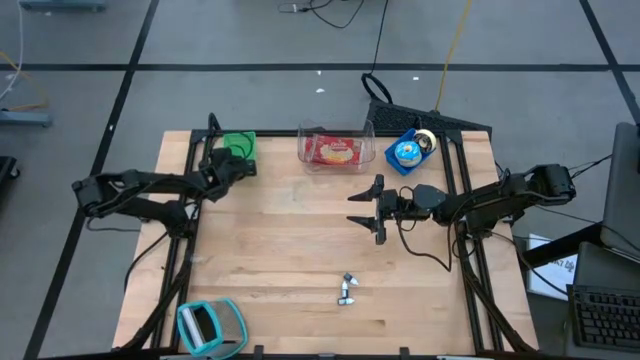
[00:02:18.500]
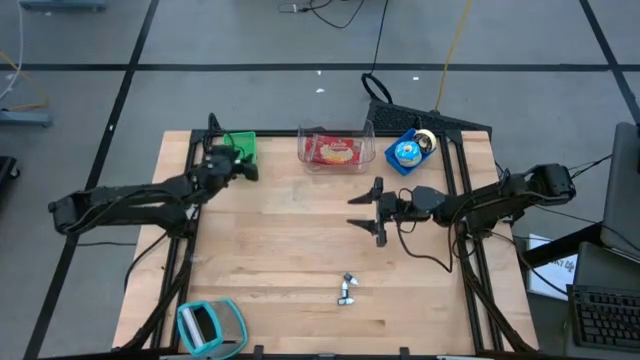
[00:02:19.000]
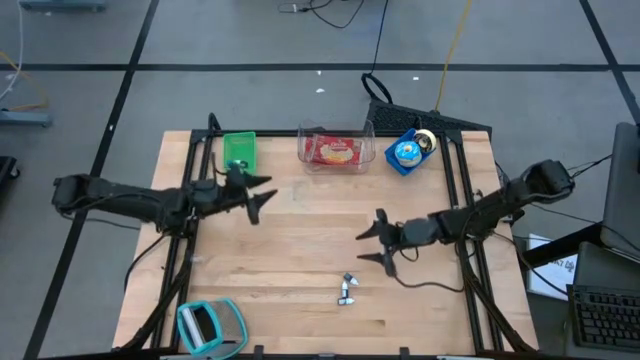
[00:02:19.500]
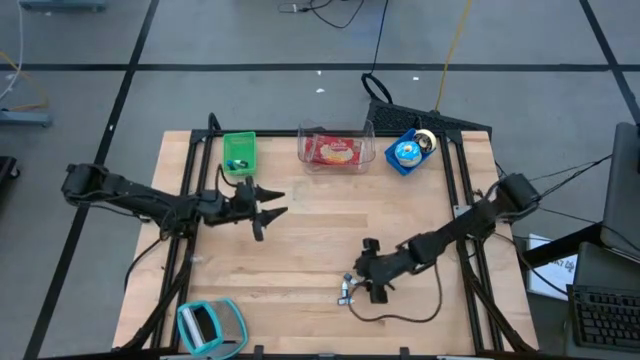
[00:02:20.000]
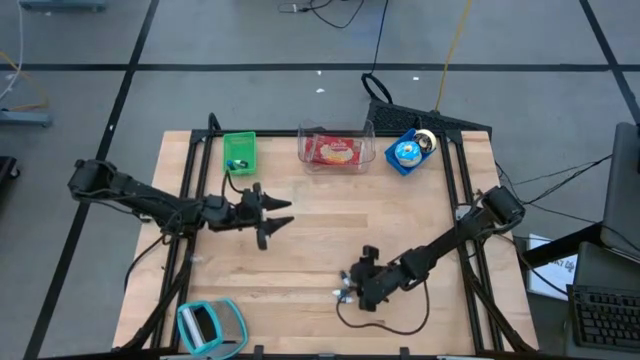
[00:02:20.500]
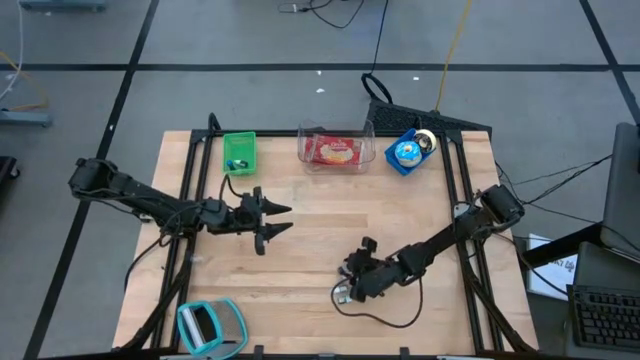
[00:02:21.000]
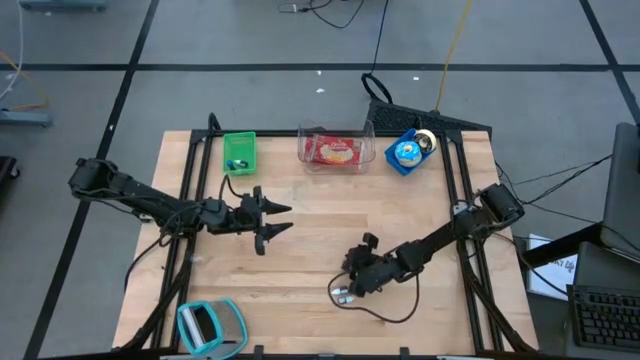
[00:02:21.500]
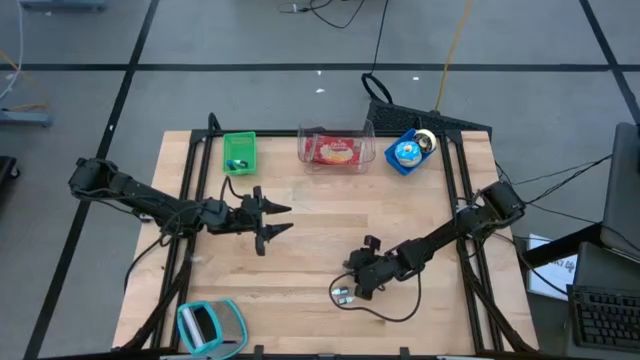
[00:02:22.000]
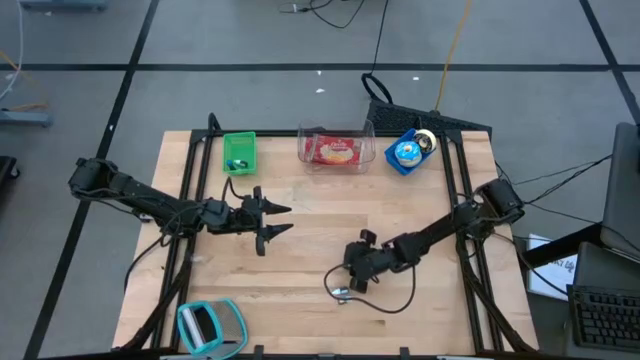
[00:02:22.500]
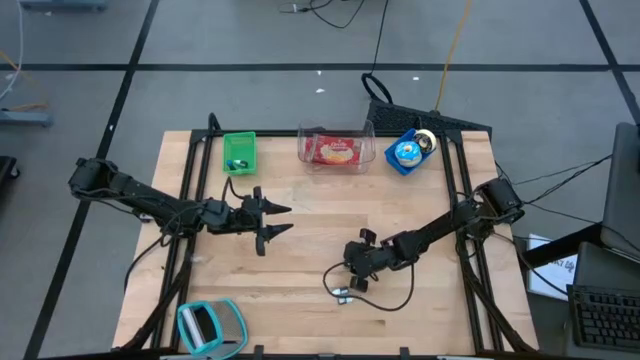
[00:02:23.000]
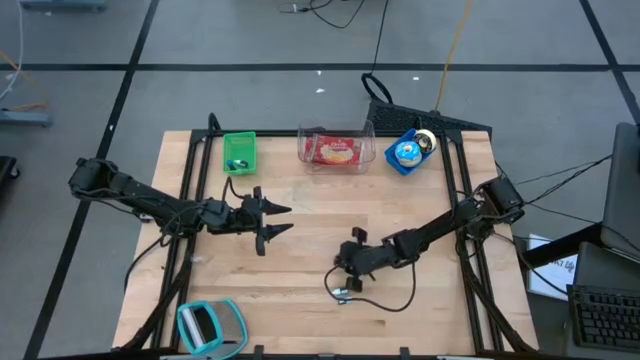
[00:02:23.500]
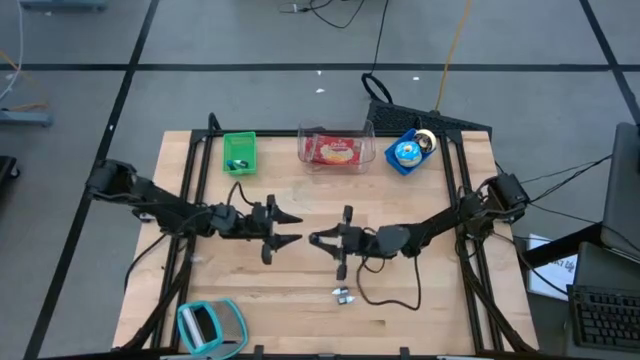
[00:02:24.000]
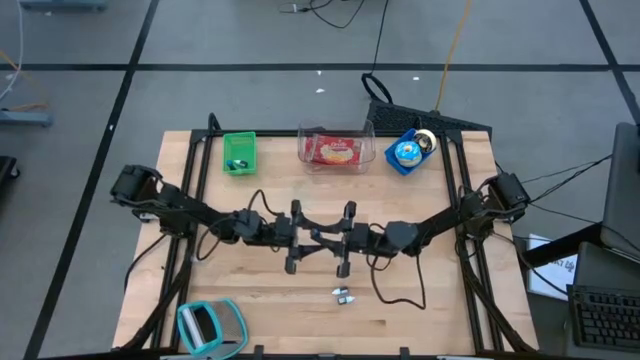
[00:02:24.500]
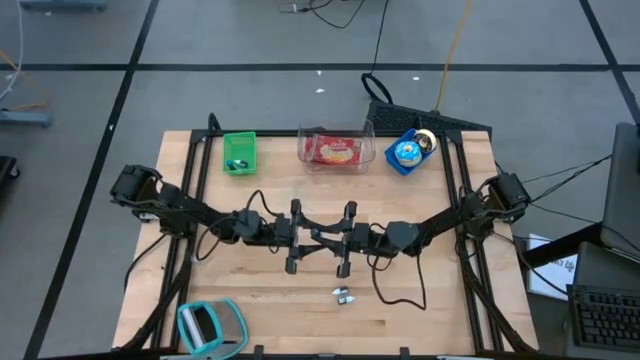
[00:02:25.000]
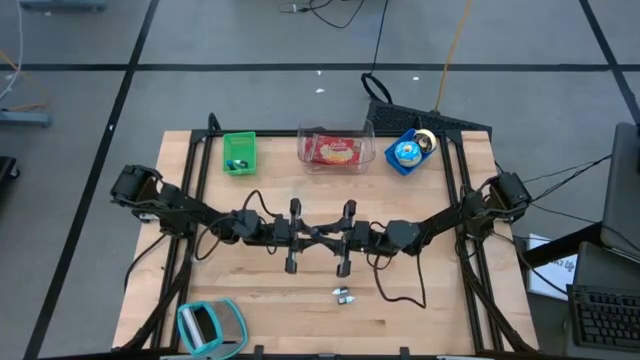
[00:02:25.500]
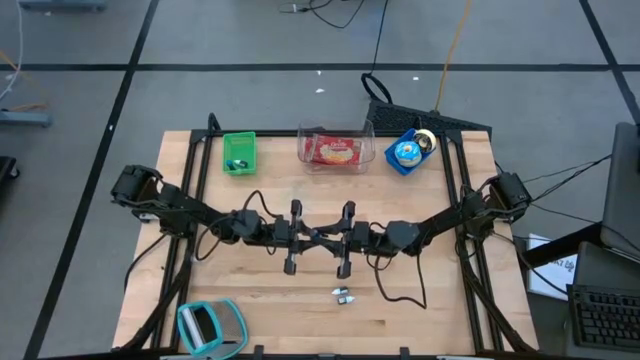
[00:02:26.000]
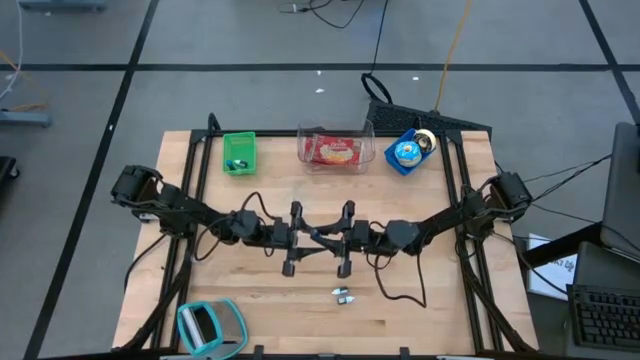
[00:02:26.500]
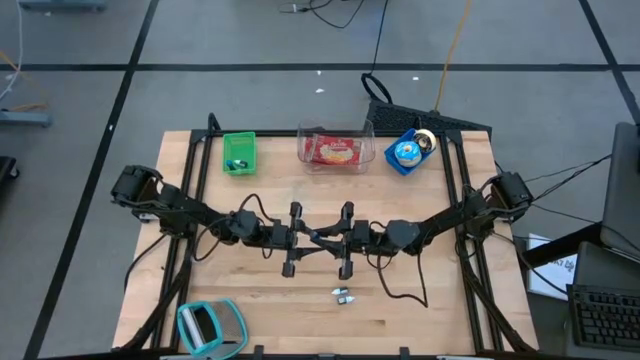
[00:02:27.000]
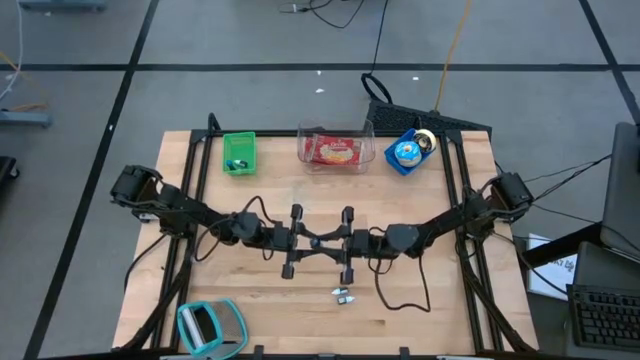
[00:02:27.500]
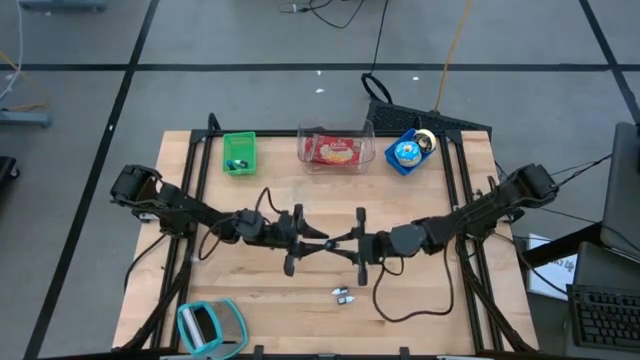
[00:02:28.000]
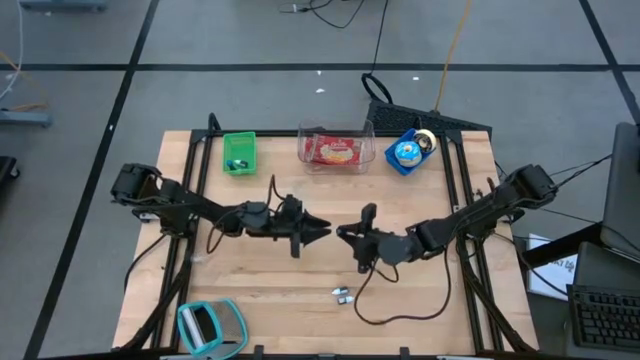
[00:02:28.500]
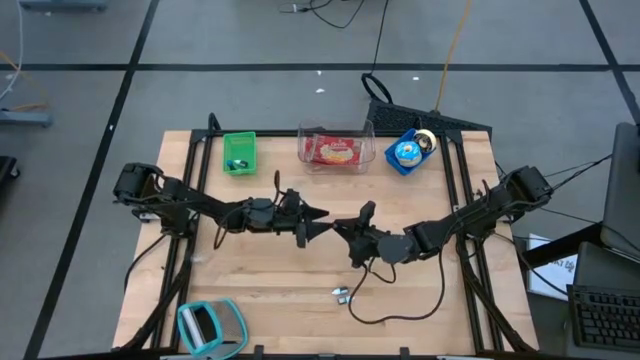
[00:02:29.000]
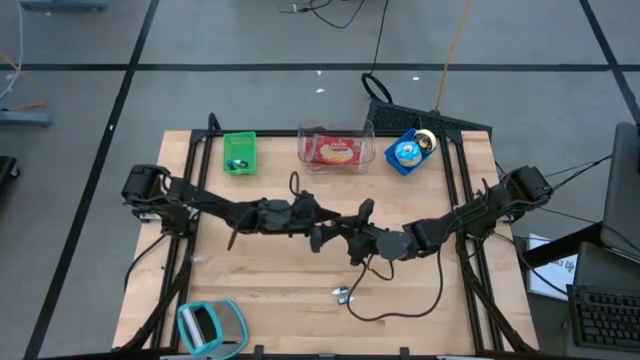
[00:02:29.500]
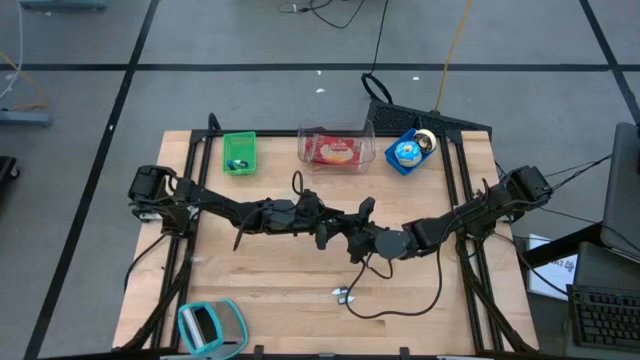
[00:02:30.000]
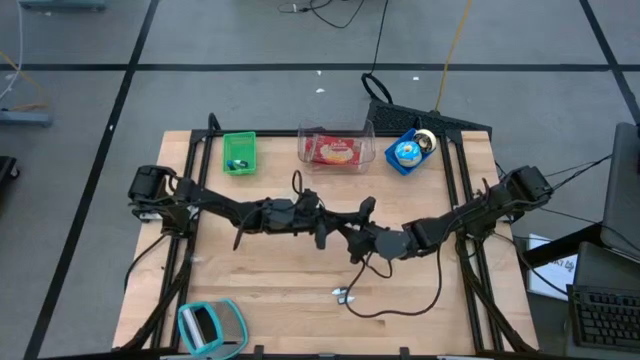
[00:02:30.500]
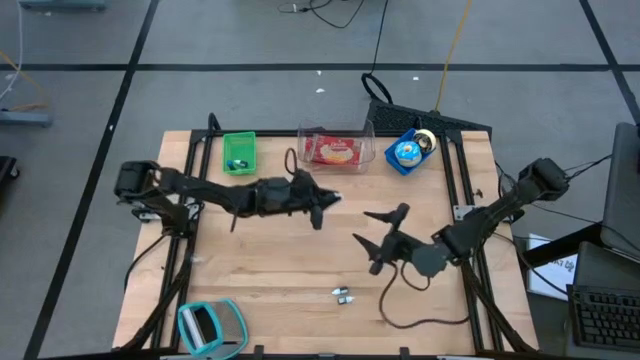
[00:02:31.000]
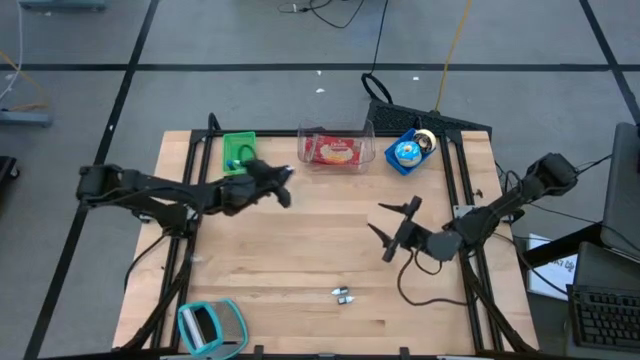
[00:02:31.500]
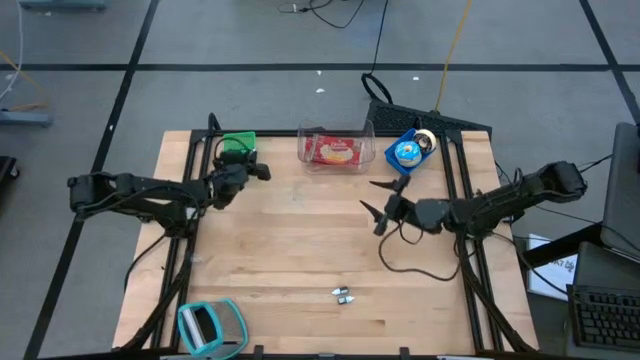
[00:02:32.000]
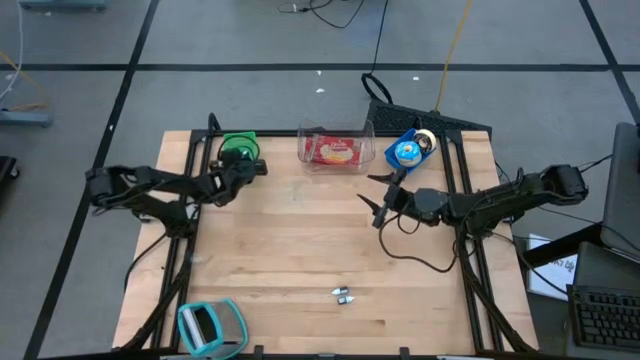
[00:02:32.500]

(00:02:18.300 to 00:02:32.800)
Put the blue food coloring bottle into the green bin

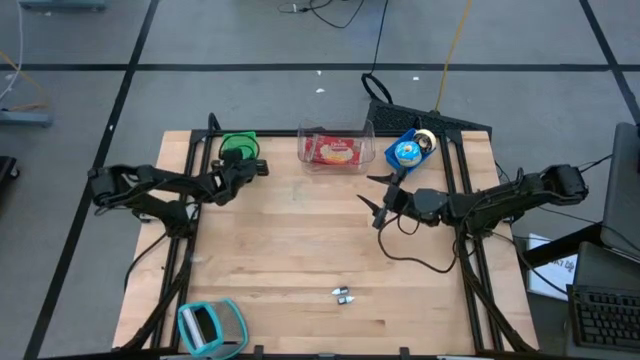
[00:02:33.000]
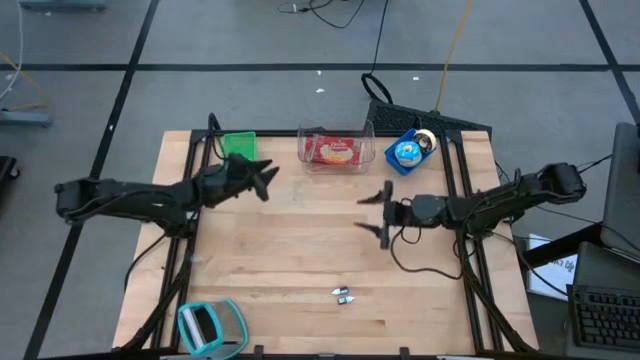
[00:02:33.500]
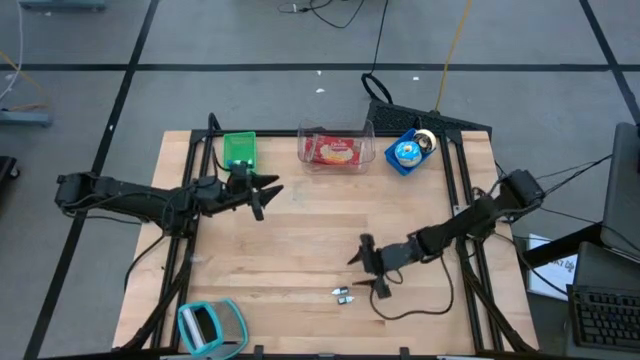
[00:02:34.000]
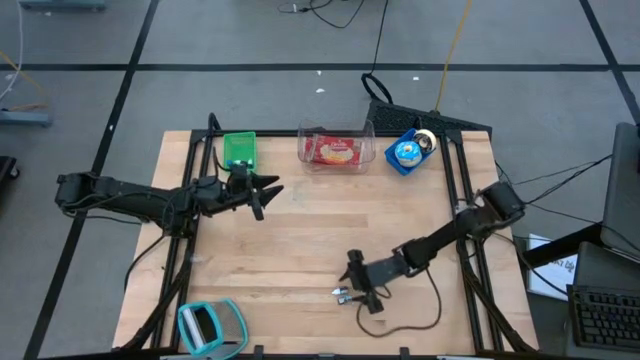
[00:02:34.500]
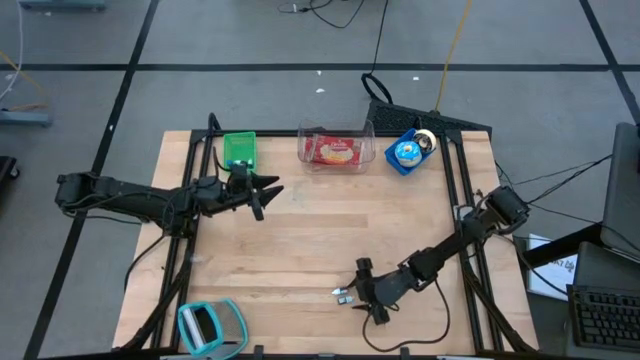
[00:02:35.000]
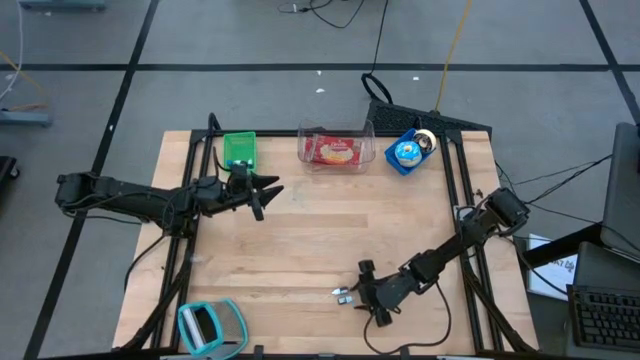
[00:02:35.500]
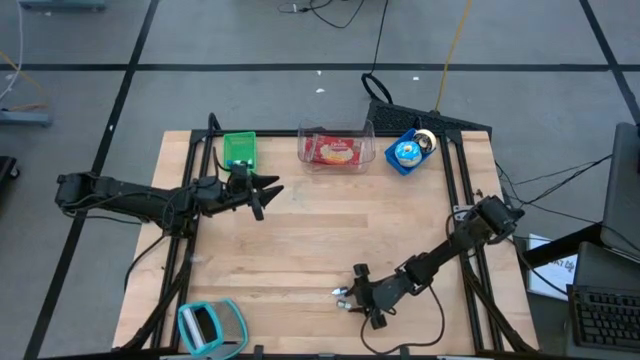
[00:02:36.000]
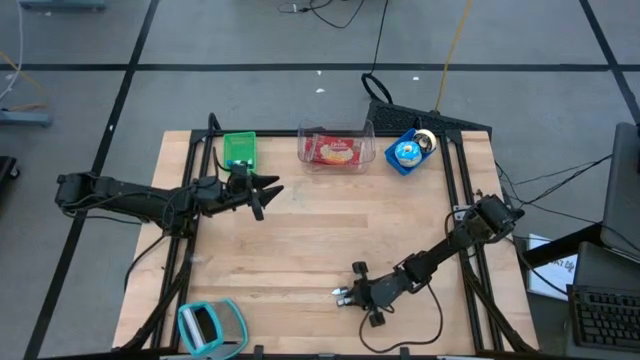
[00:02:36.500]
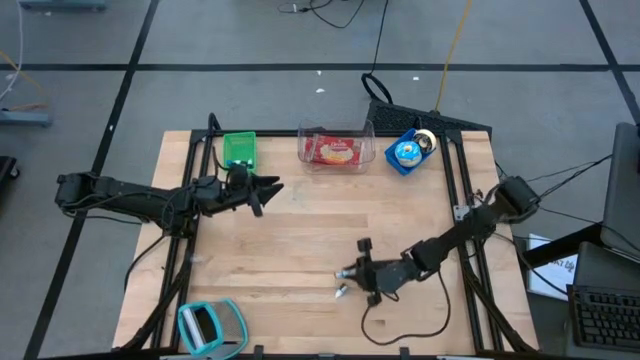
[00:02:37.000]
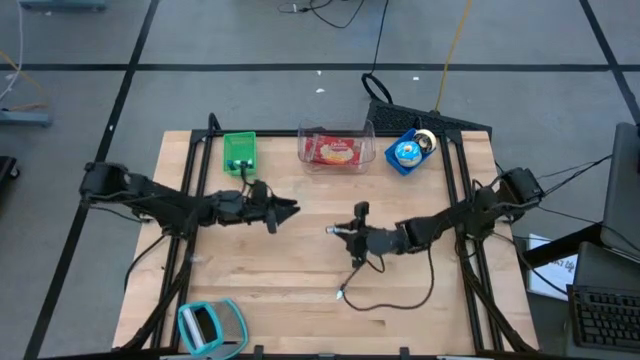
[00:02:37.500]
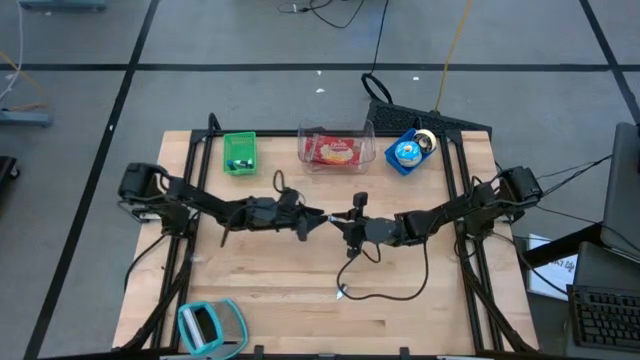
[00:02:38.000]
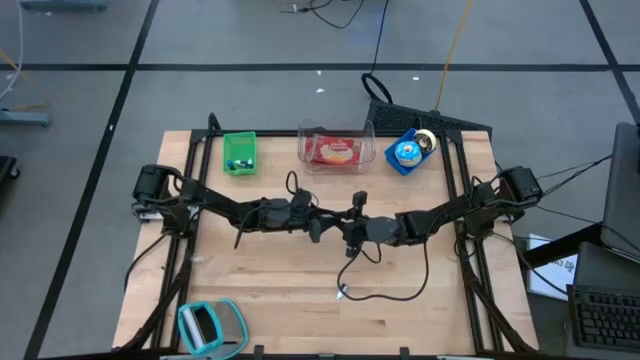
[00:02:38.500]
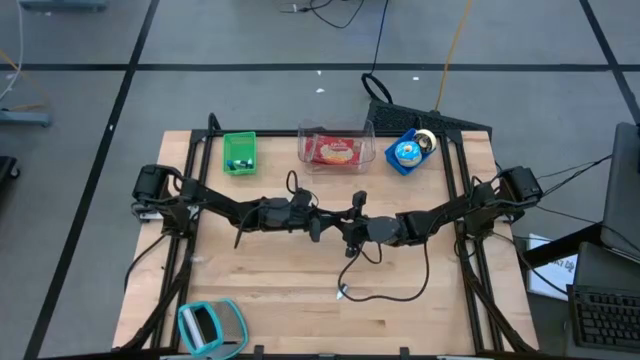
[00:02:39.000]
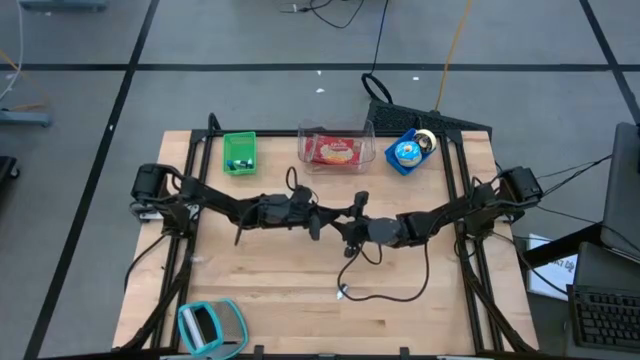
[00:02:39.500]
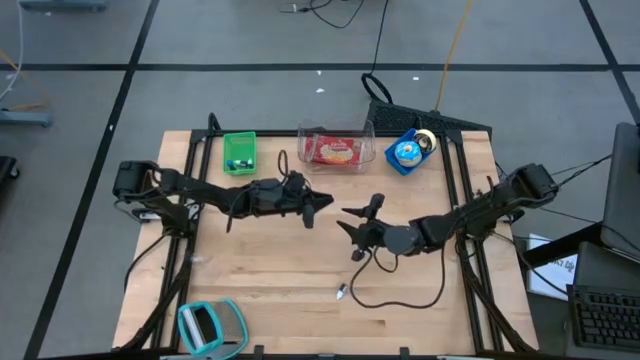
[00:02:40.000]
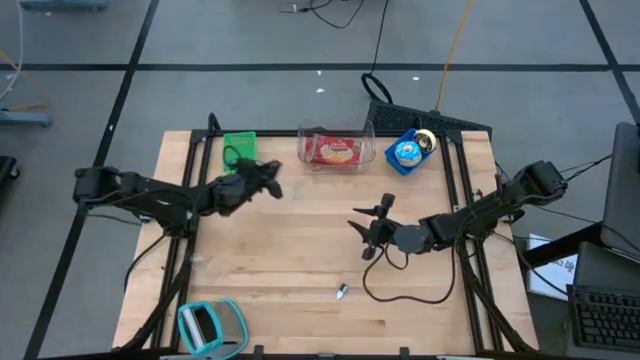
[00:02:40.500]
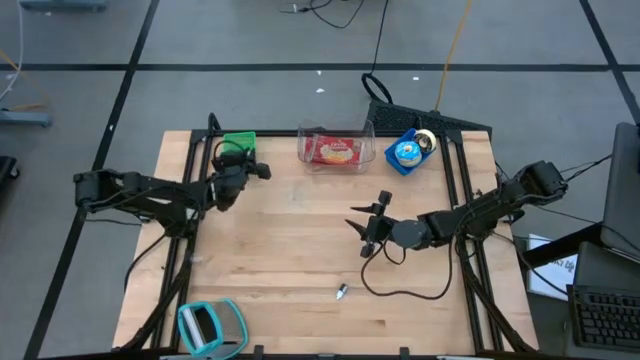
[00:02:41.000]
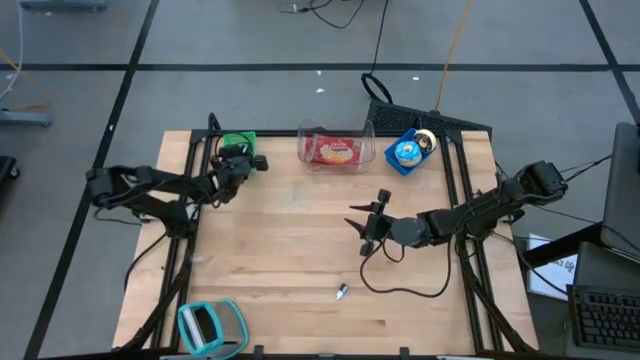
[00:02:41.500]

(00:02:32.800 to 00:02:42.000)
Put the brown food coloring bottle into the green bin
